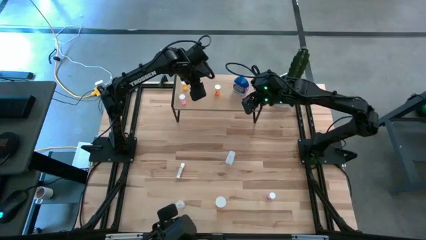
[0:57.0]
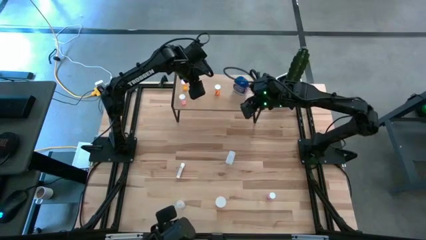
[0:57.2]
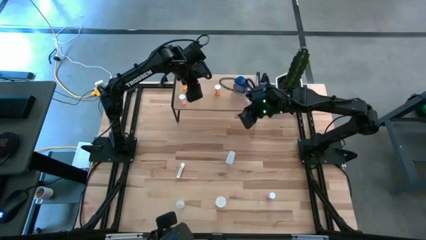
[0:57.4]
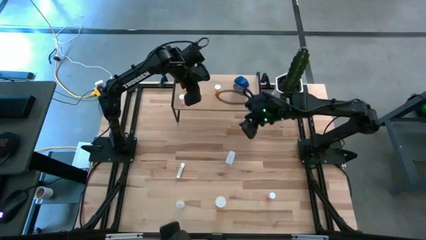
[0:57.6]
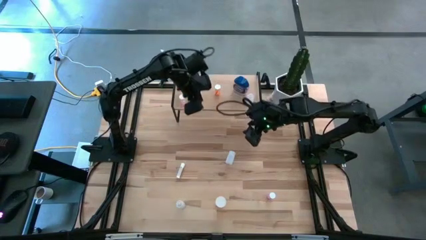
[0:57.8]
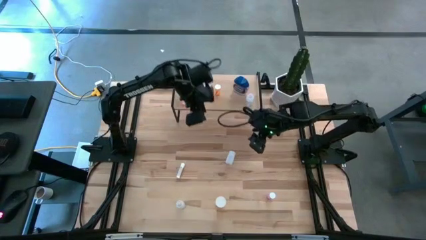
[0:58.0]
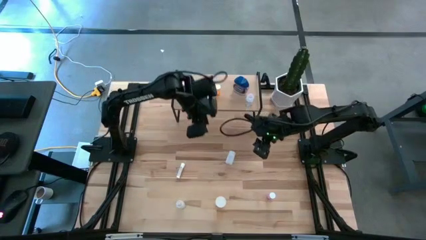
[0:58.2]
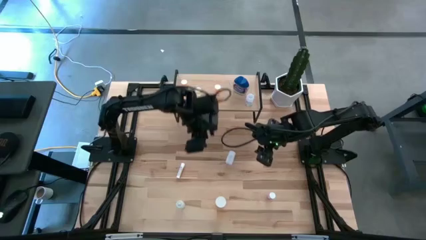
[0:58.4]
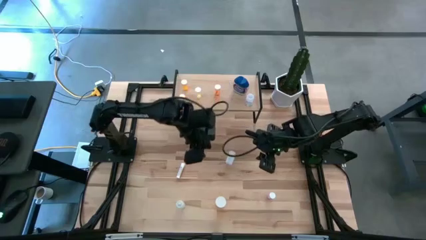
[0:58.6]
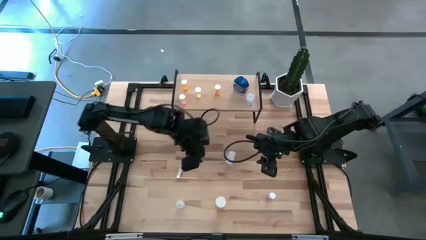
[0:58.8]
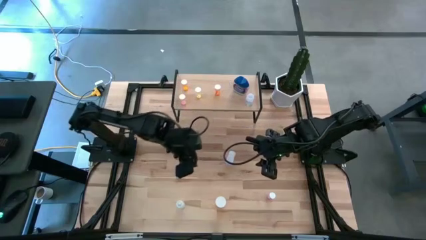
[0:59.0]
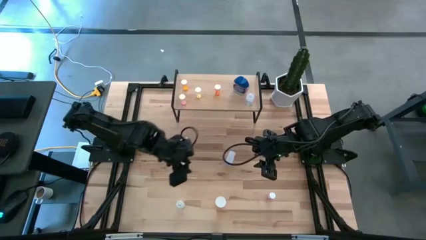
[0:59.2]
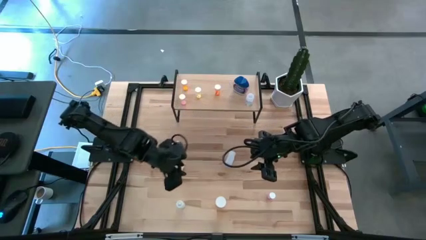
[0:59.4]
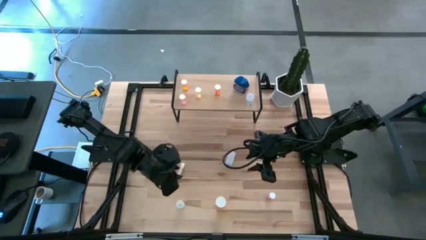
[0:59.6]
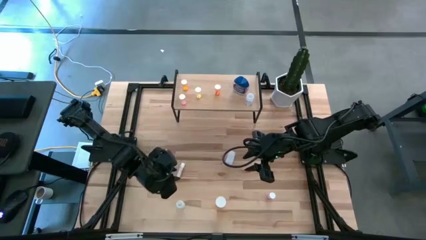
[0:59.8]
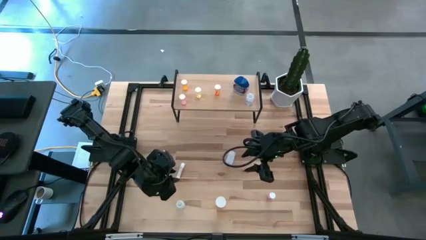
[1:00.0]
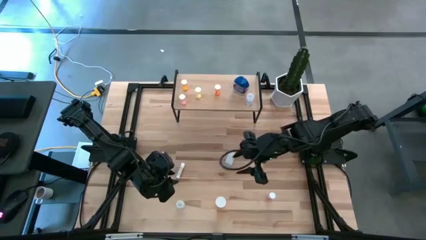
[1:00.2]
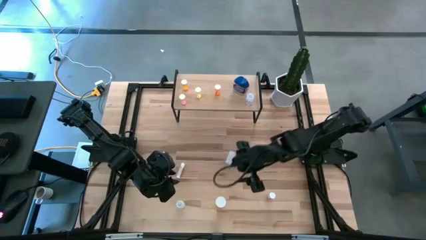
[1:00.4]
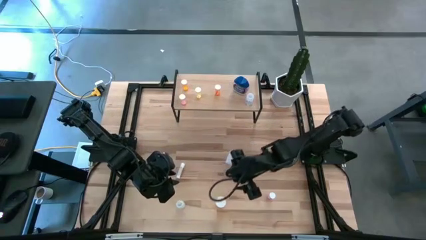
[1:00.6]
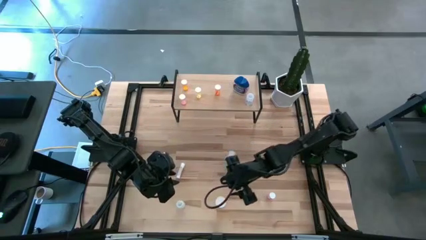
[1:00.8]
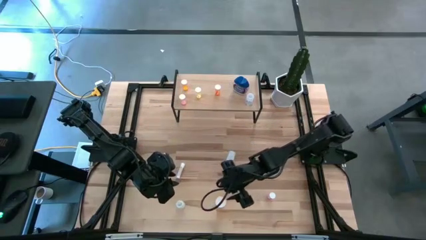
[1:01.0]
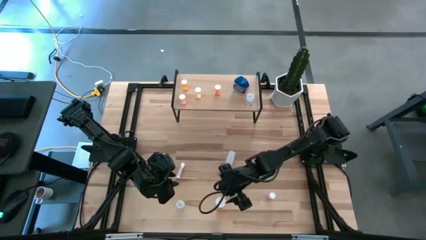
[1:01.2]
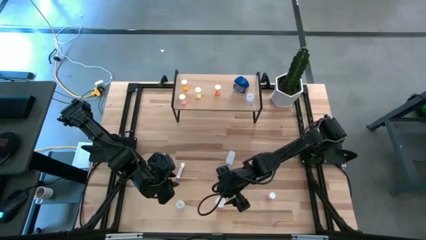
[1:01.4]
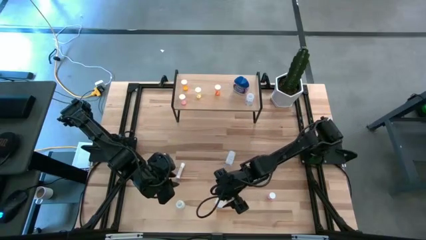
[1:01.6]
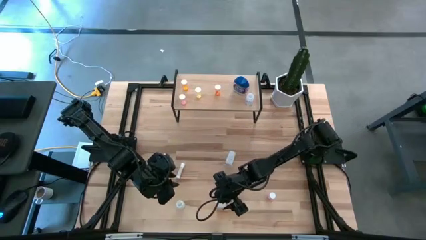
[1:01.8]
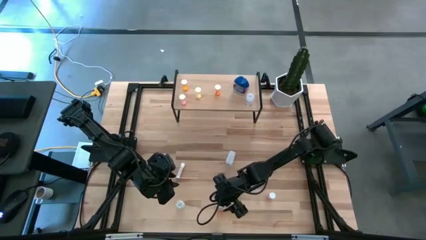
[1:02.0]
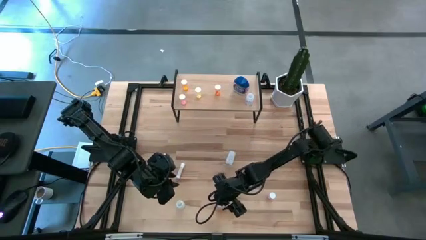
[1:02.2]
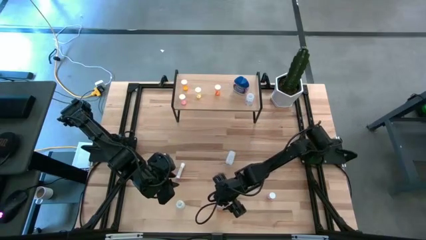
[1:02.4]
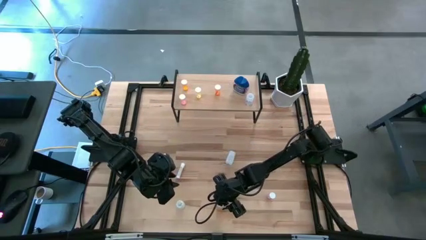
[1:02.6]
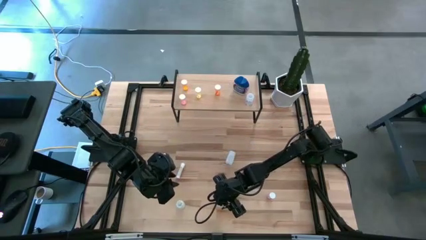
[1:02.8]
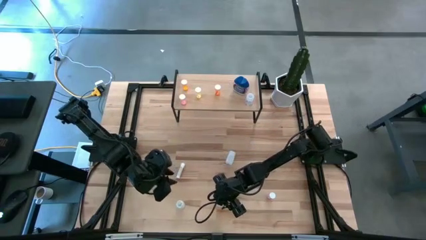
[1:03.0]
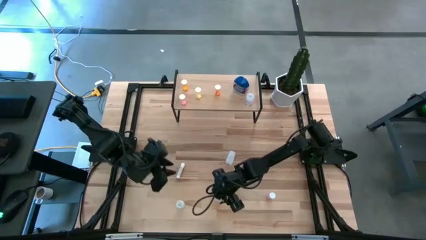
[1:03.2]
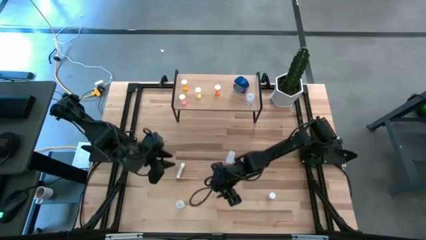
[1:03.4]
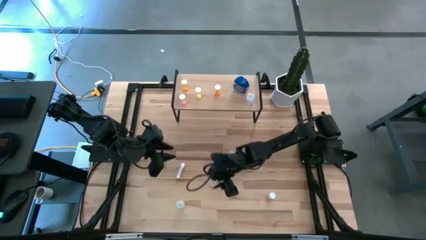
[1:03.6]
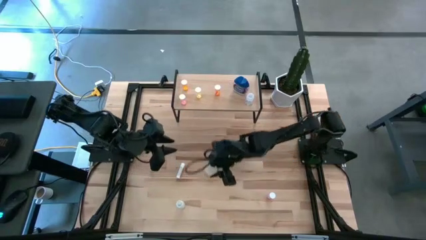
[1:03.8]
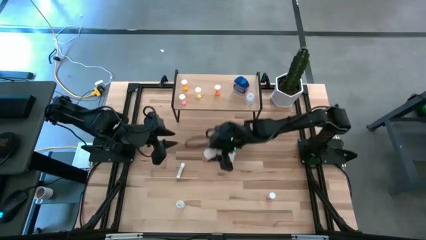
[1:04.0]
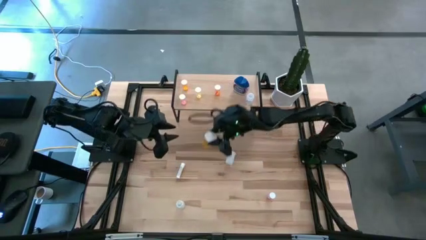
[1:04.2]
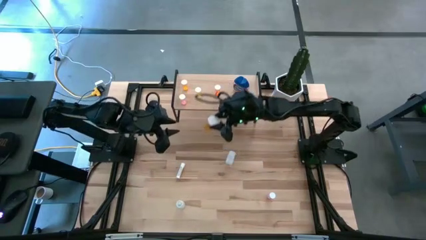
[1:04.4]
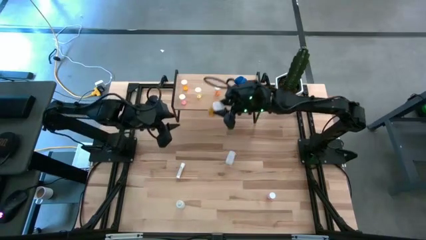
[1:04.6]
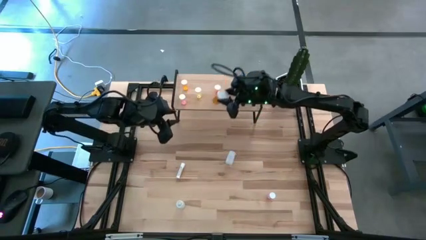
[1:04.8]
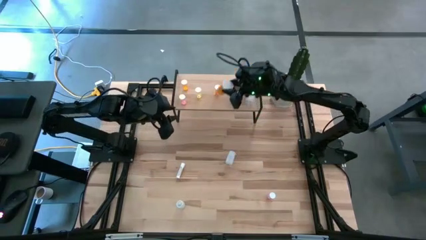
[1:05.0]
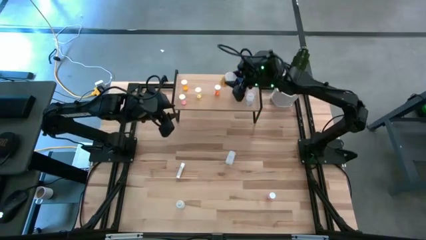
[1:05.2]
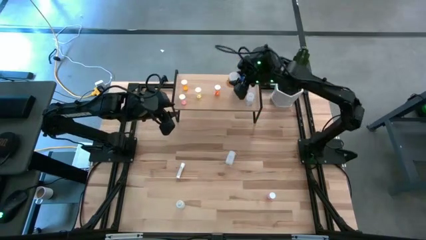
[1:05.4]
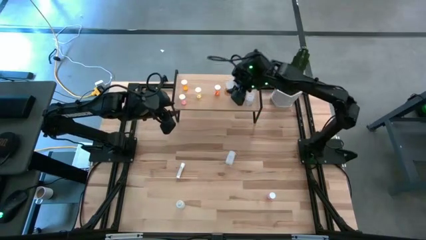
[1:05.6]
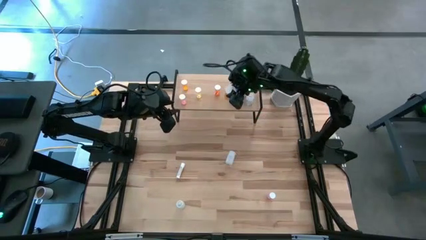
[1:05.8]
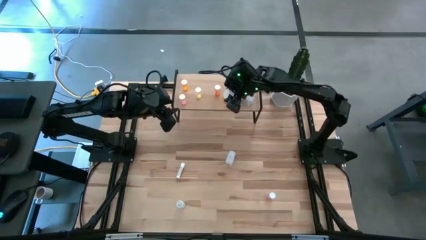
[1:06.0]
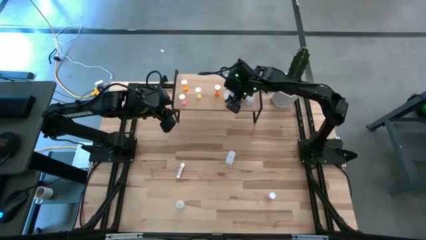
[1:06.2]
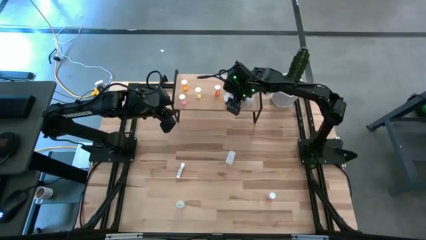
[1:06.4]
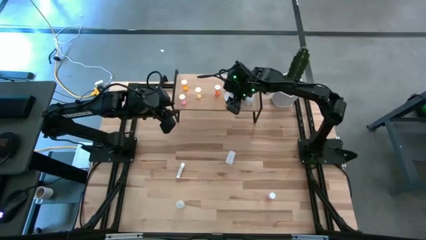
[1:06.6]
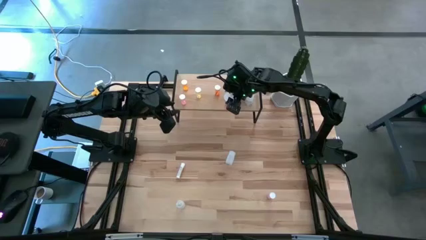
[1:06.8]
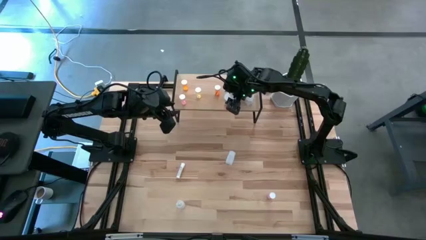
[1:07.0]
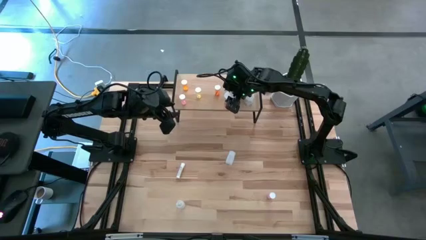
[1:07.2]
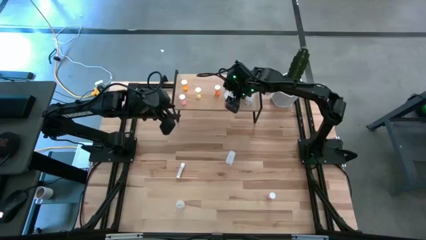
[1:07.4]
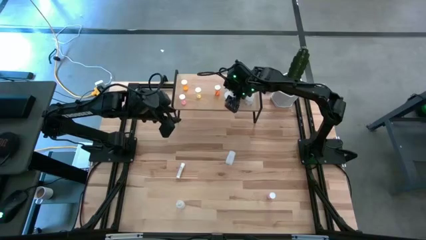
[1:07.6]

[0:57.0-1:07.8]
Task: Pick and place medicine bottles onto shelf by color
Put the large orange pill bottle on the shelf

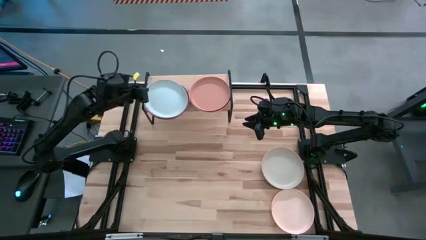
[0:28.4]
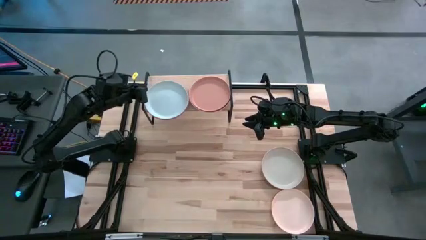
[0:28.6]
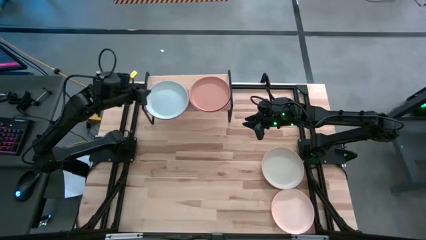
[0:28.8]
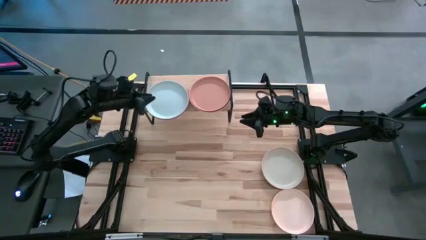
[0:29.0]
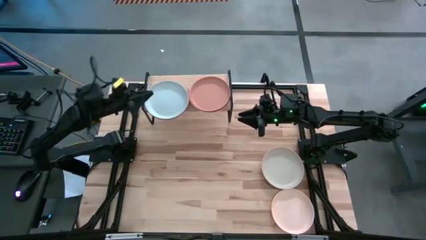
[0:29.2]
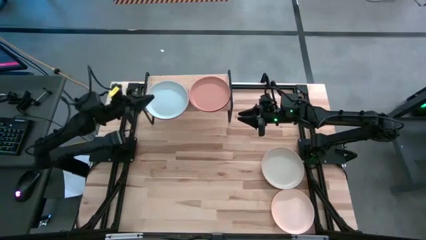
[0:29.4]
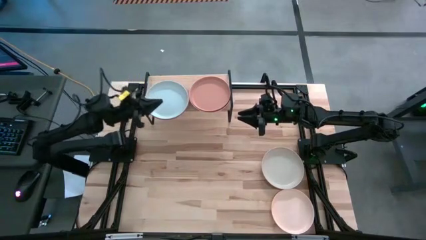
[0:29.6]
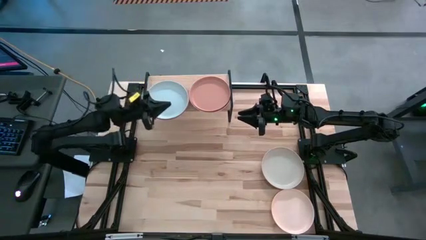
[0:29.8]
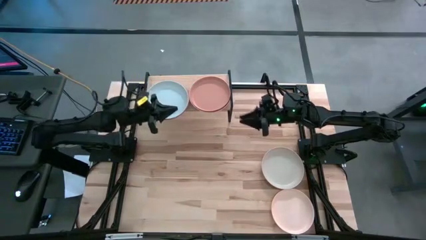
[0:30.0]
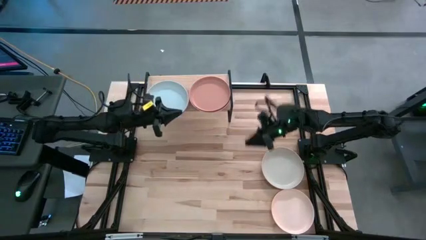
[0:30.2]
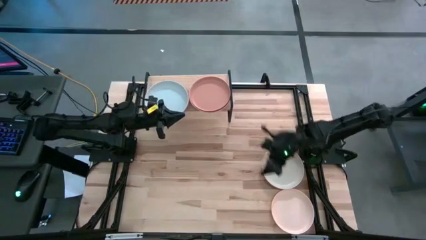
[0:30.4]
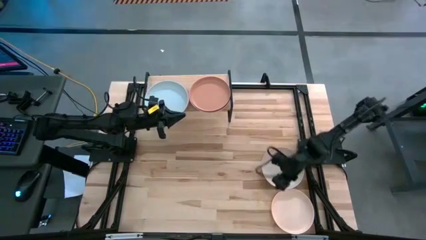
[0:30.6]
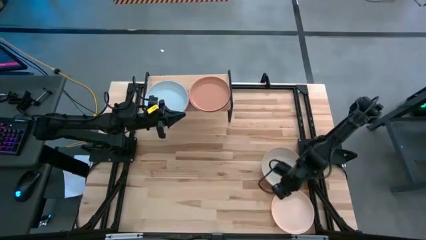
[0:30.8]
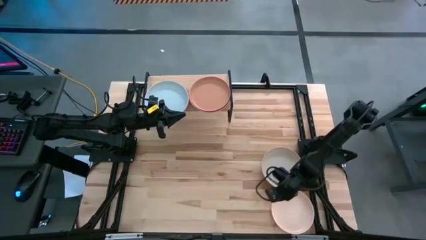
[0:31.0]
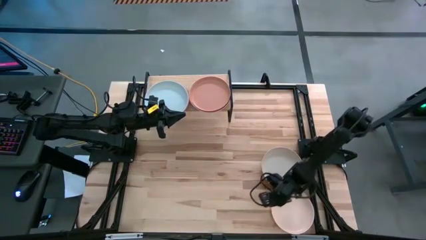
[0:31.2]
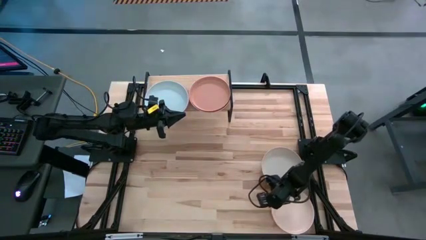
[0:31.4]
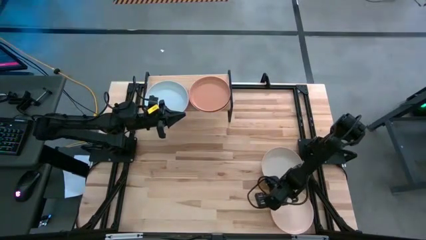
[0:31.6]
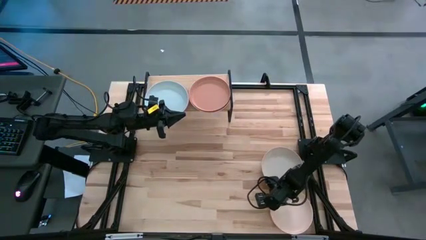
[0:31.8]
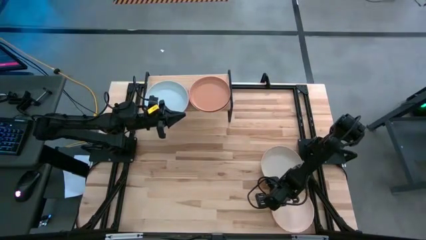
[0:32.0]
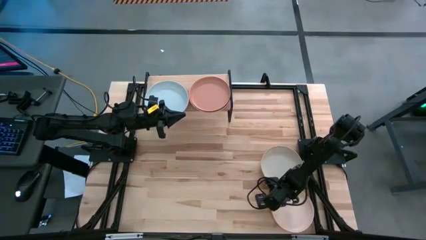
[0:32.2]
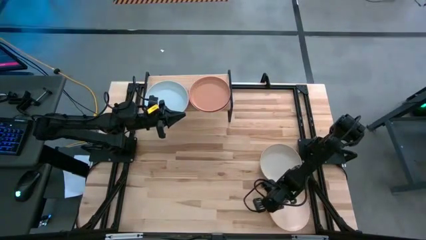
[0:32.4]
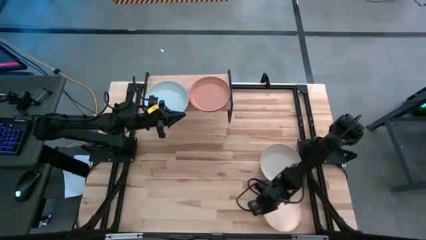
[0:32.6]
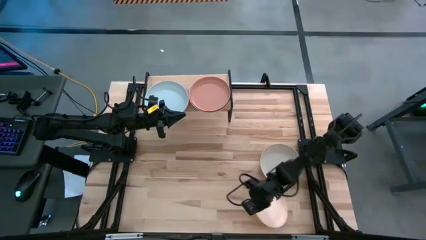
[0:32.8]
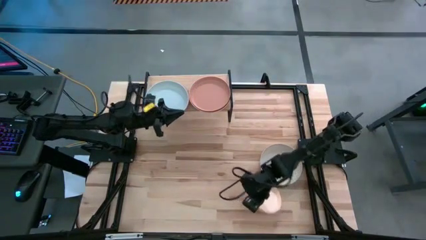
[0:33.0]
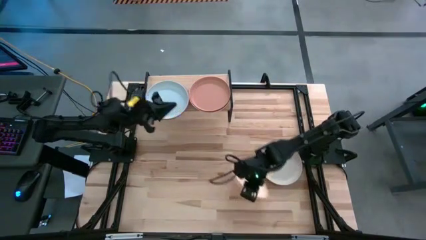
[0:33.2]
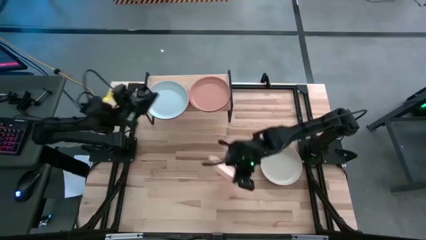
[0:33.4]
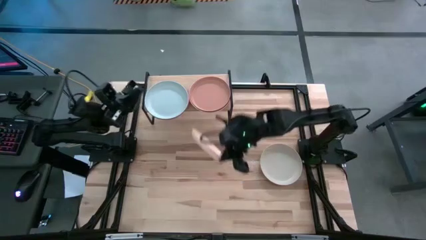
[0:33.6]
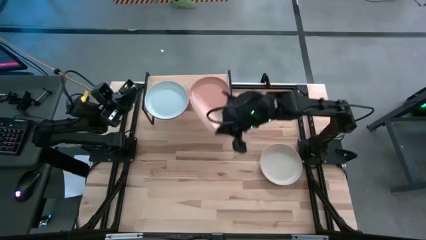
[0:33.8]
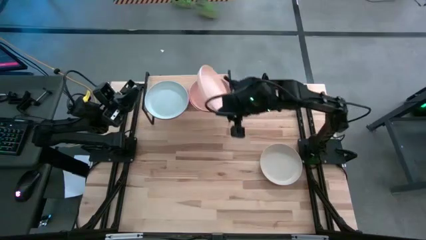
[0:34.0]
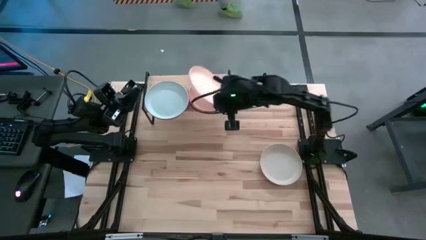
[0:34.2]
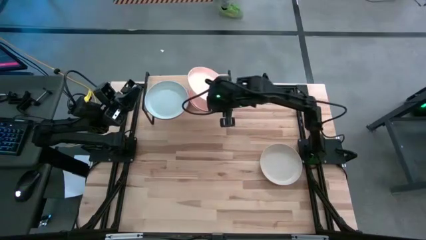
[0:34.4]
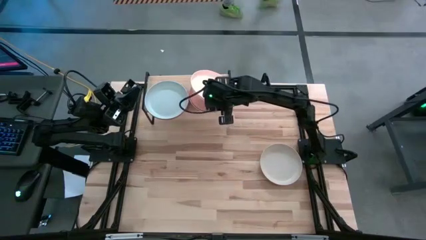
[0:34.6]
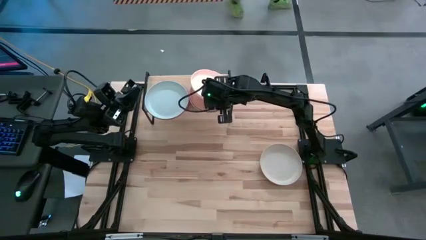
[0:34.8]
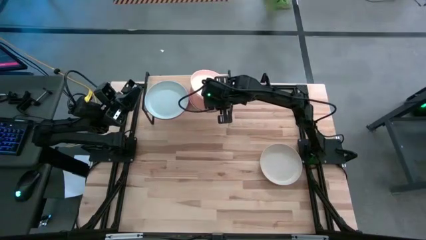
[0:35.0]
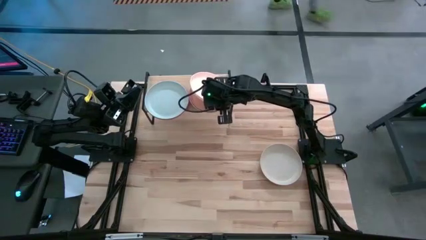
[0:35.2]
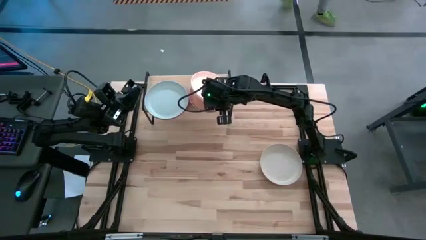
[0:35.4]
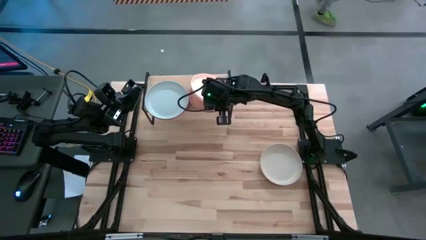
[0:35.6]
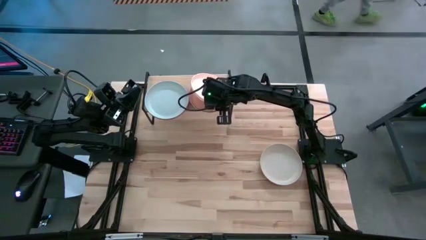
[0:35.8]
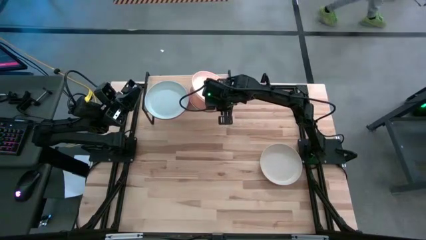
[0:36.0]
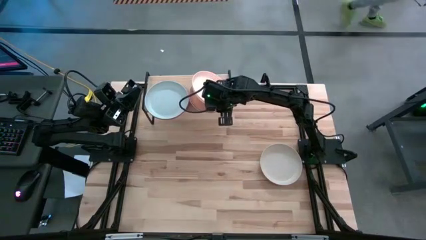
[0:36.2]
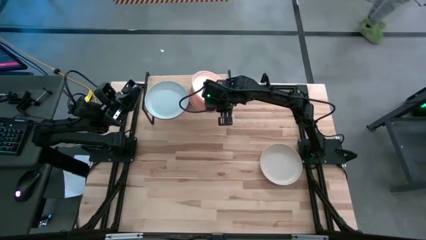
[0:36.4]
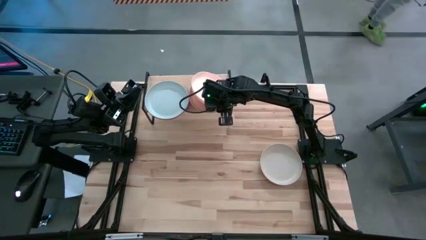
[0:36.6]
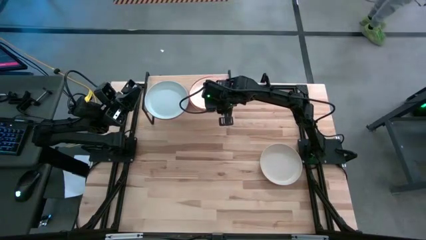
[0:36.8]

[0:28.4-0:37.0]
Task: Place and stack plates onto a shelf
Stack the light orange plate on top of the brown plate
